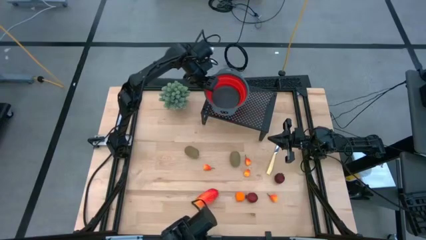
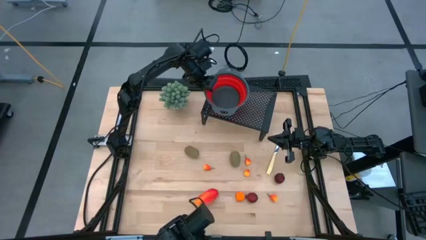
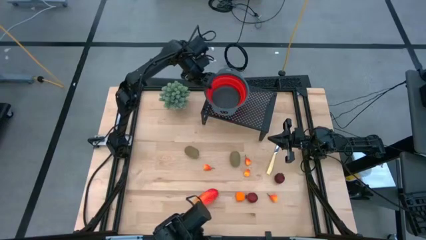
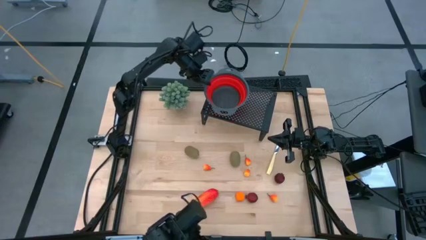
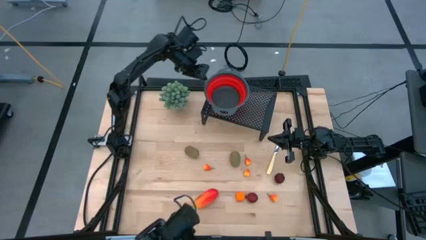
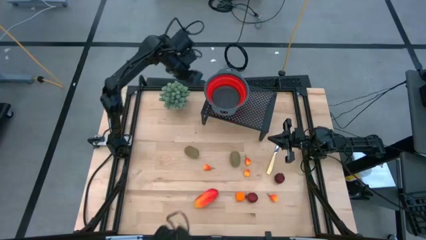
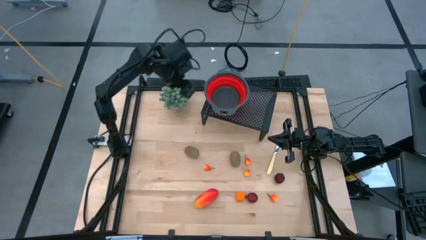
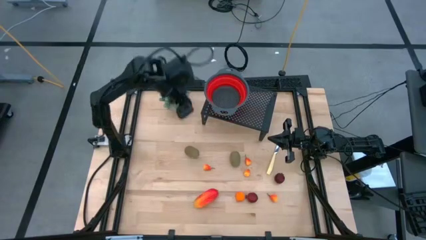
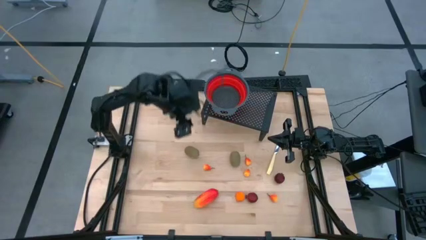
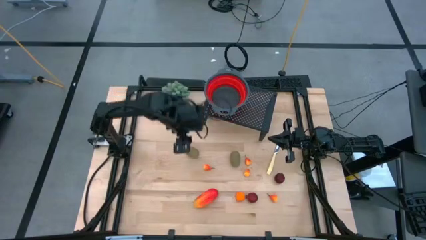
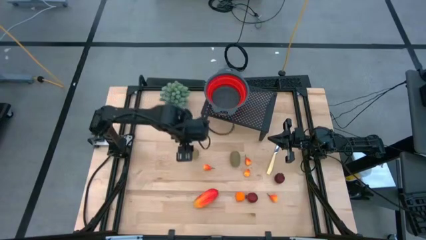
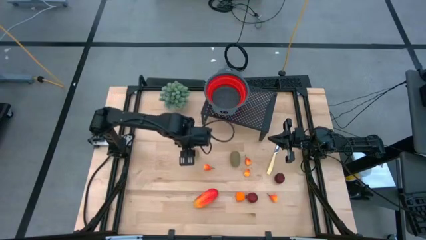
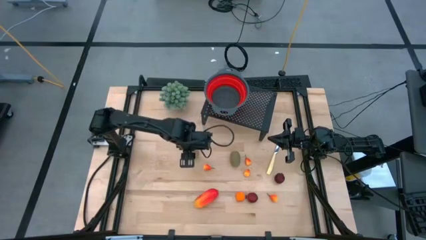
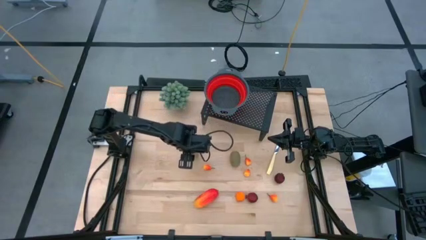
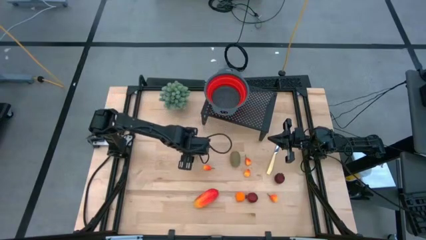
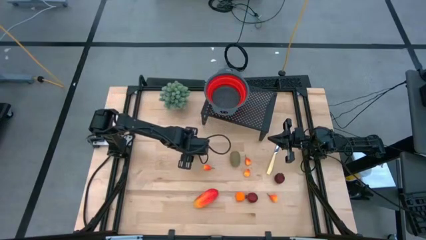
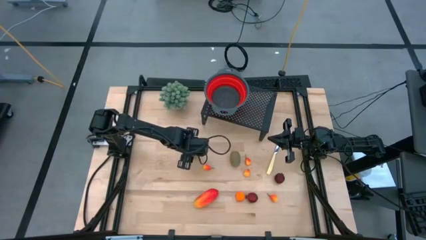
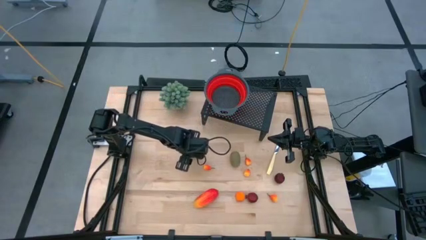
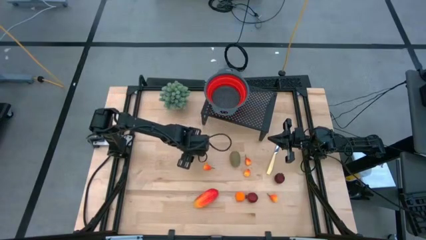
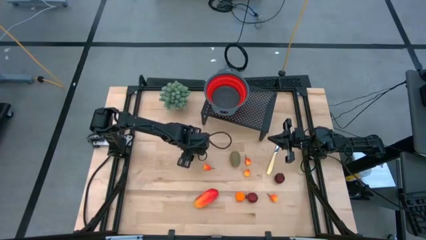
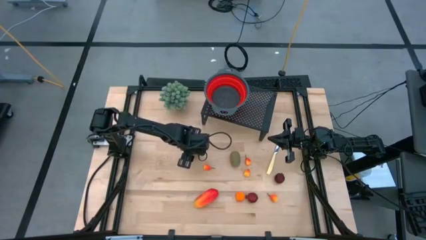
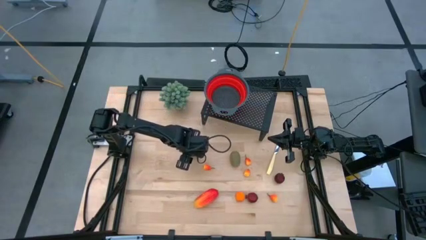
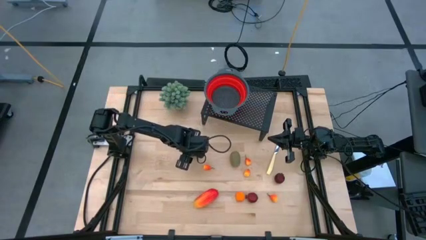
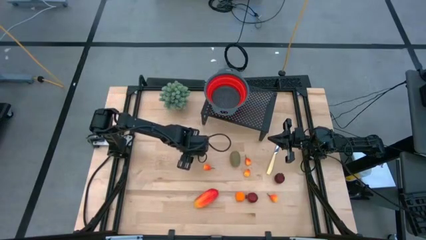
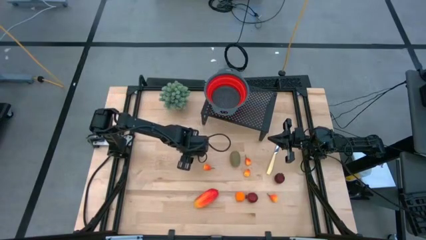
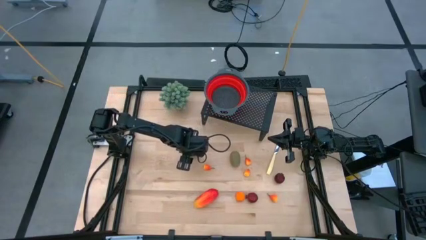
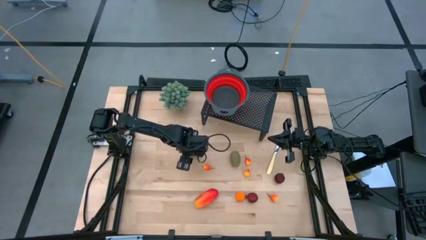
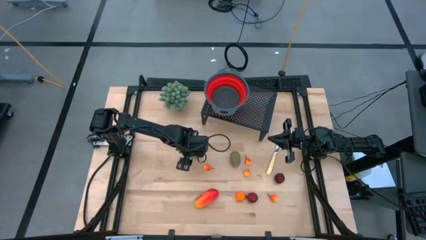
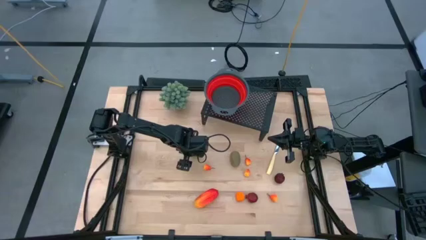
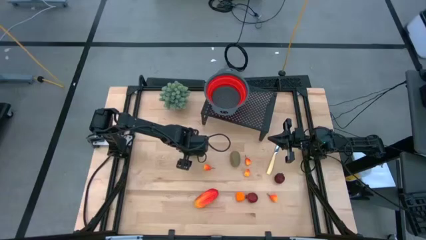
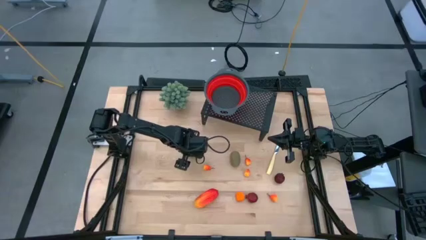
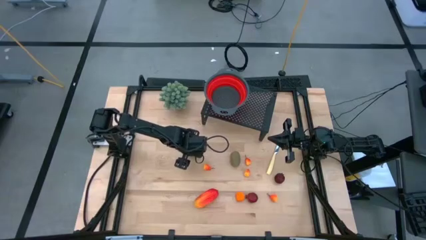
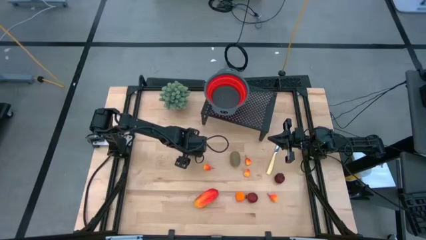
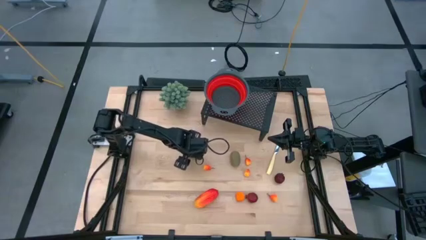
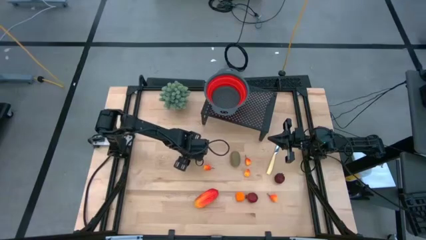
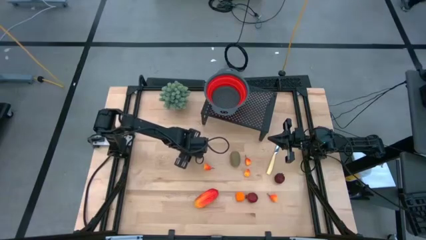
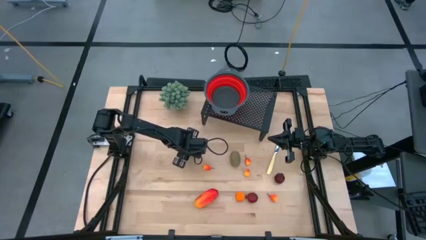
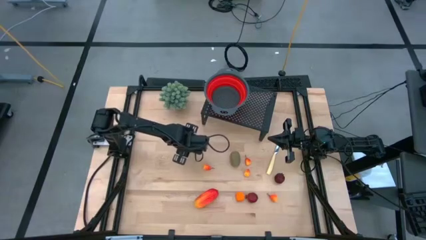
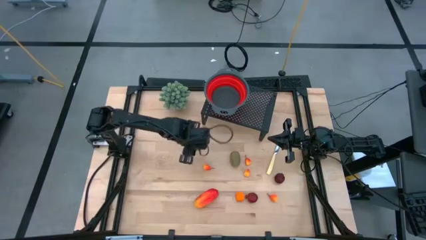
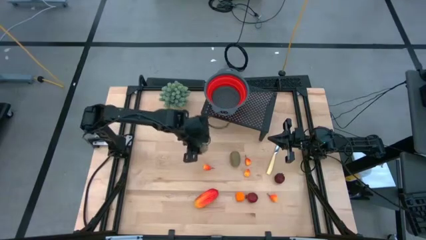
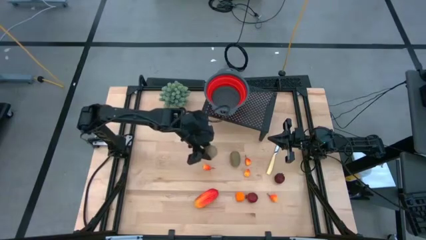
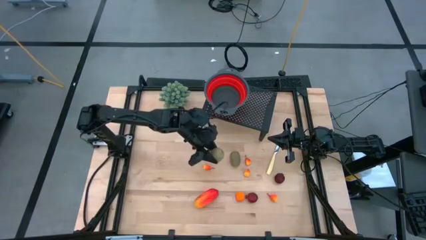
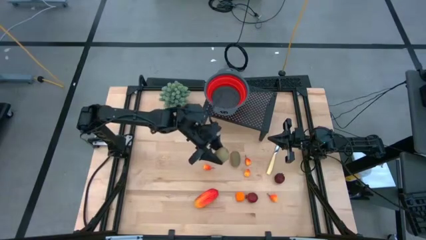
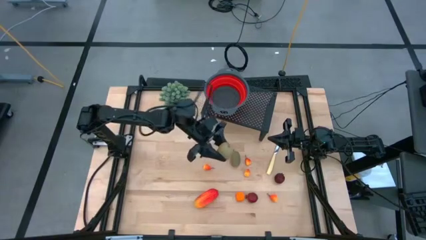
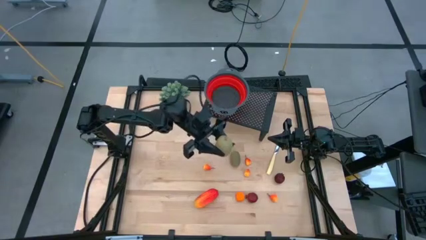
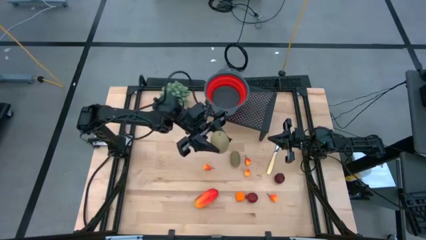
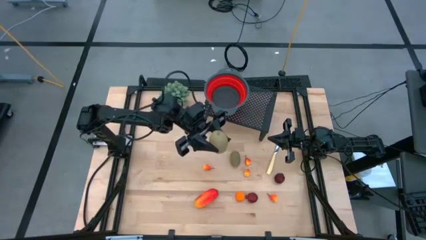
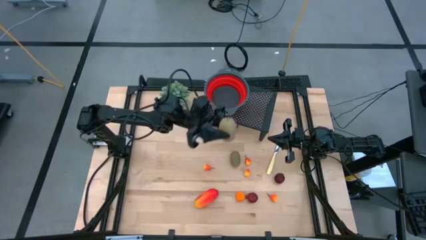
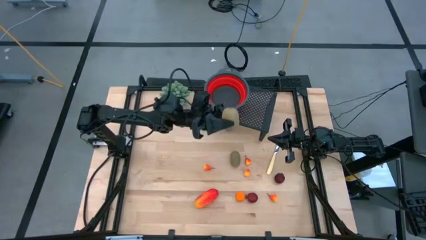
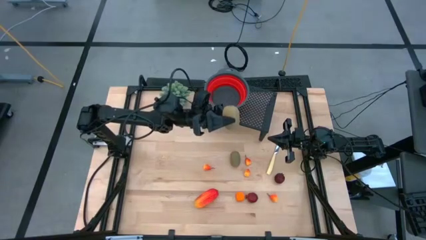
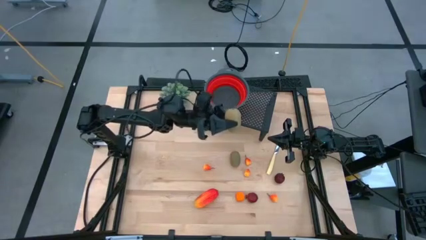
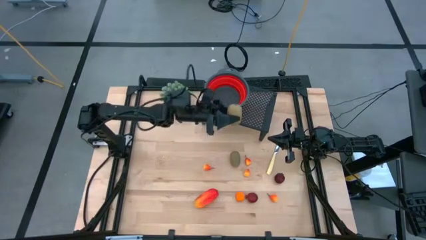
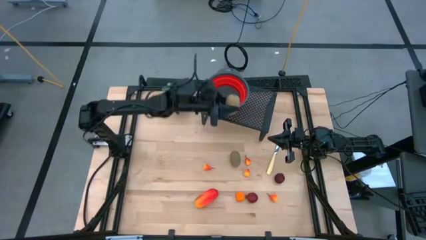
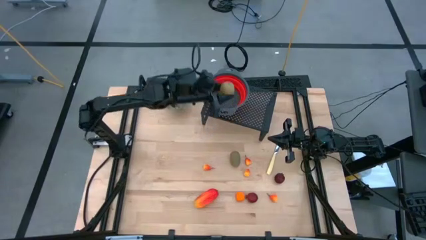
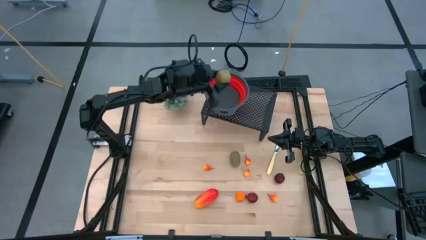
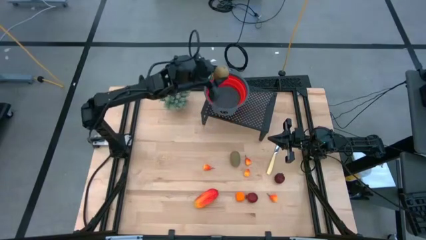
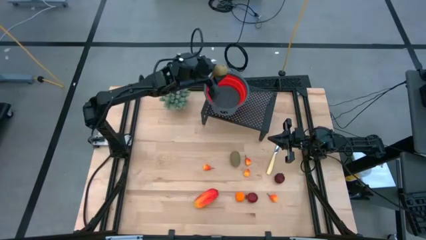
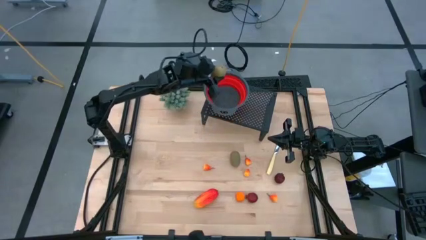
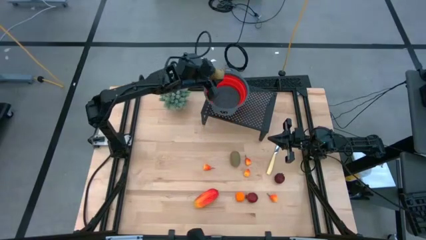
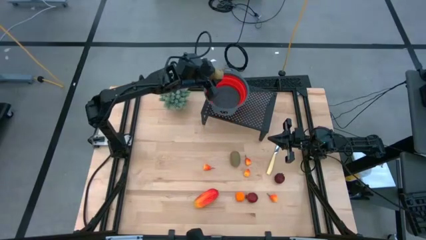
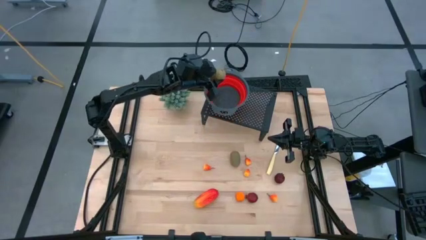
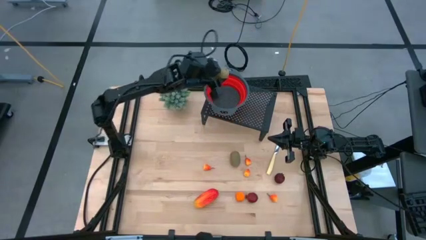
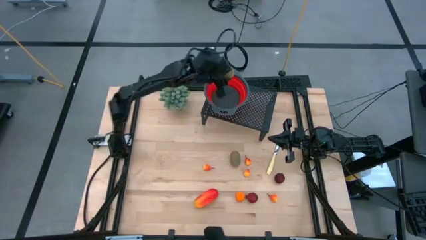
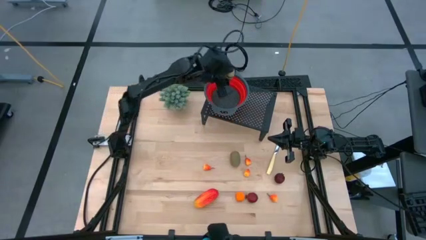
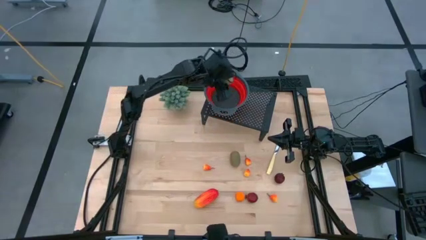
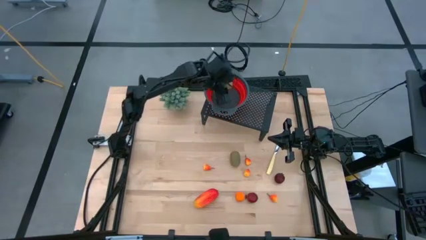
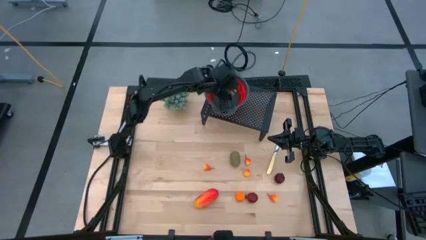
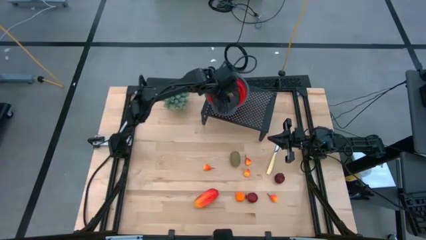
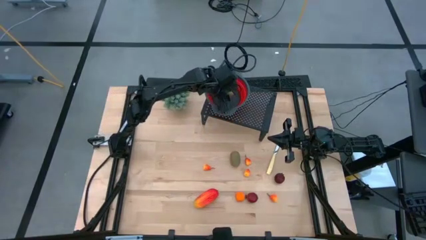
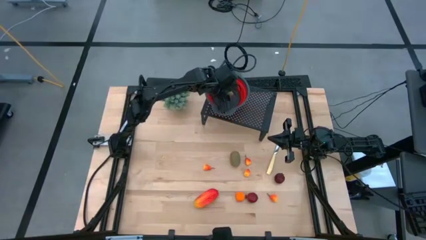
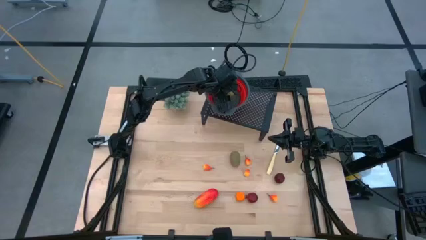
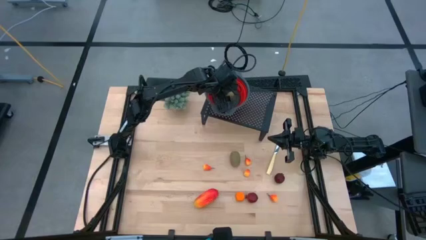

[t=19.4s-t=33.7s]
Task: Pick & Place Fruit
Put the kiwi into the red strainer bowl
